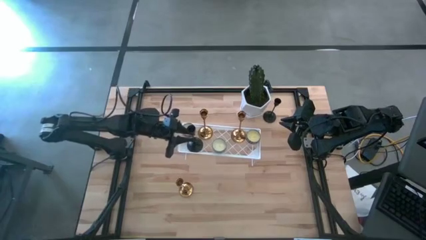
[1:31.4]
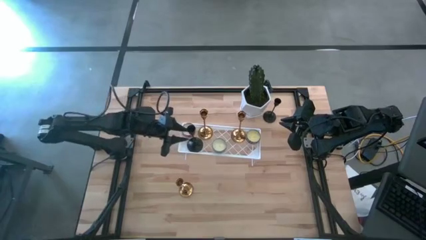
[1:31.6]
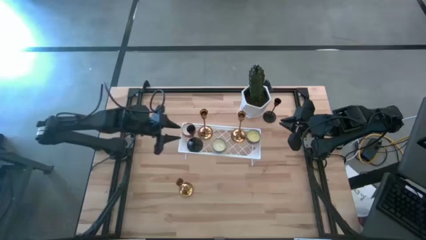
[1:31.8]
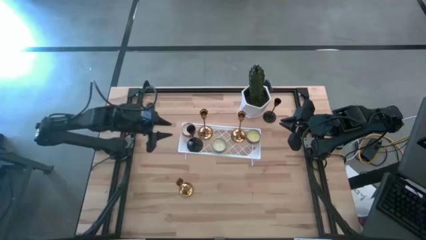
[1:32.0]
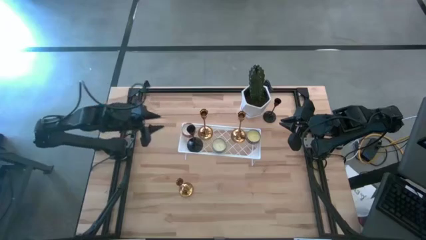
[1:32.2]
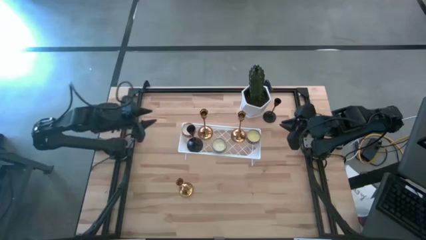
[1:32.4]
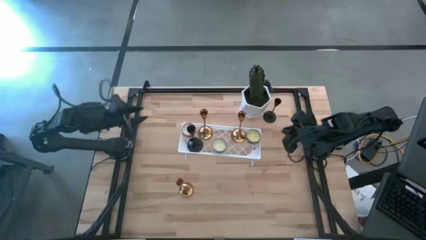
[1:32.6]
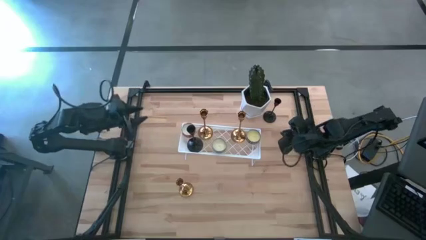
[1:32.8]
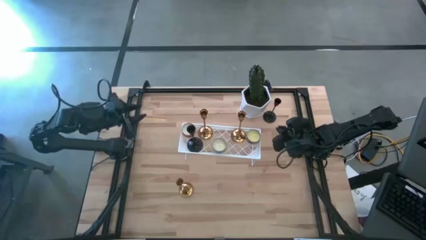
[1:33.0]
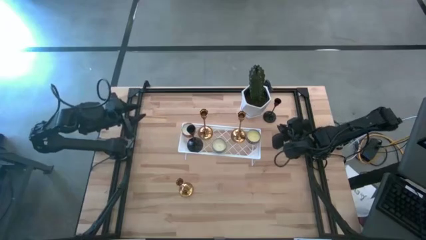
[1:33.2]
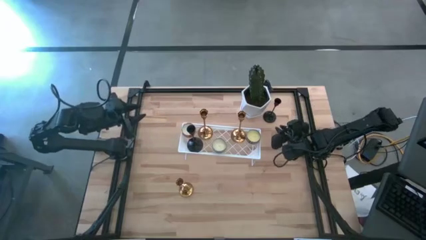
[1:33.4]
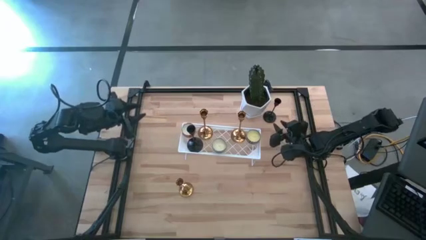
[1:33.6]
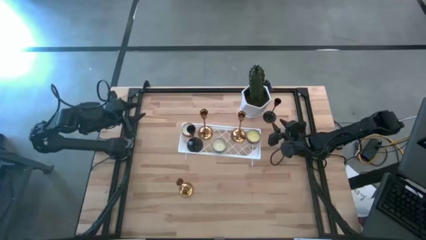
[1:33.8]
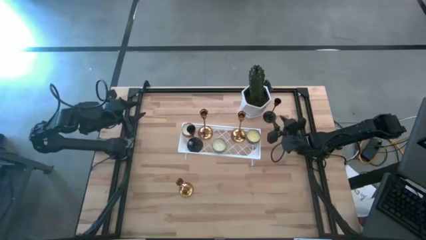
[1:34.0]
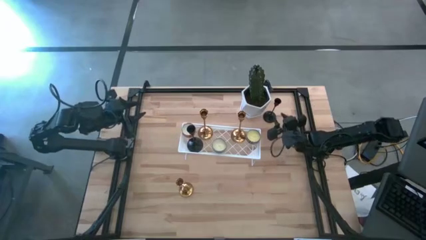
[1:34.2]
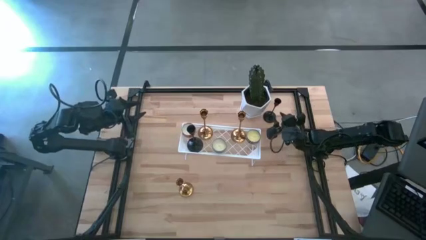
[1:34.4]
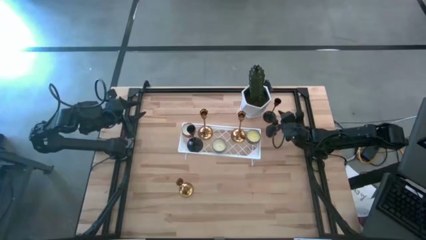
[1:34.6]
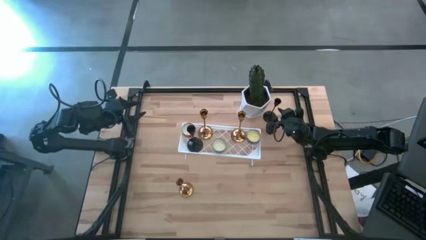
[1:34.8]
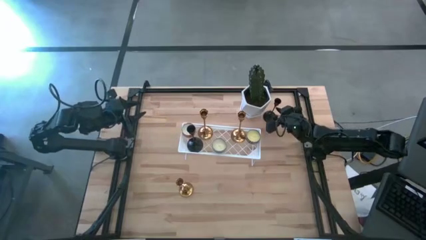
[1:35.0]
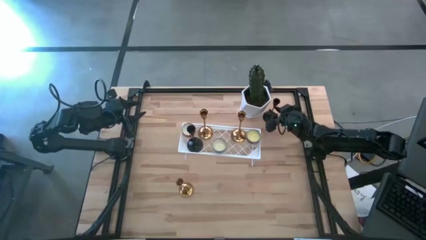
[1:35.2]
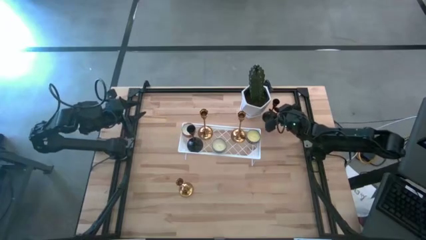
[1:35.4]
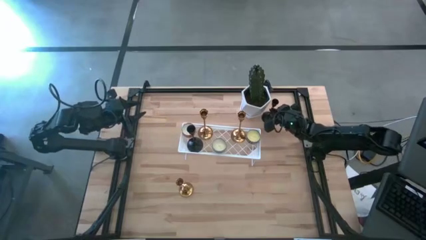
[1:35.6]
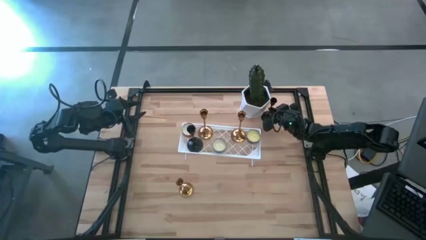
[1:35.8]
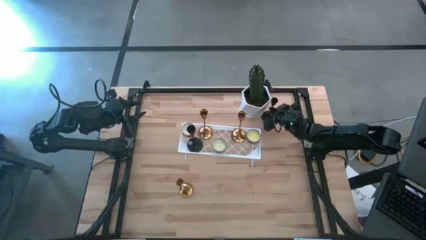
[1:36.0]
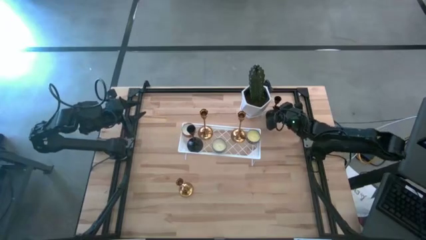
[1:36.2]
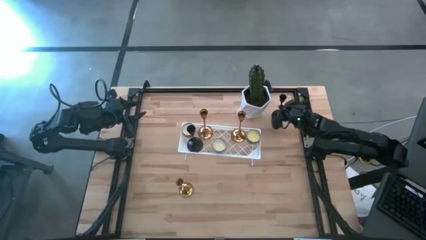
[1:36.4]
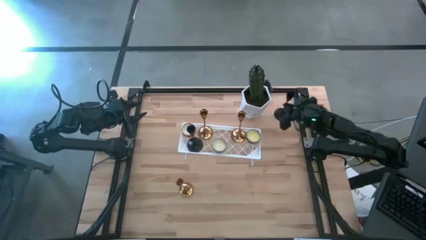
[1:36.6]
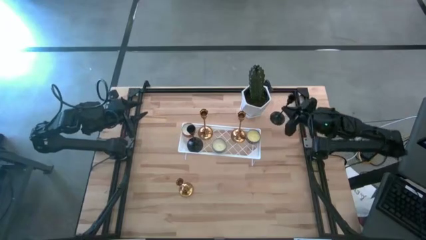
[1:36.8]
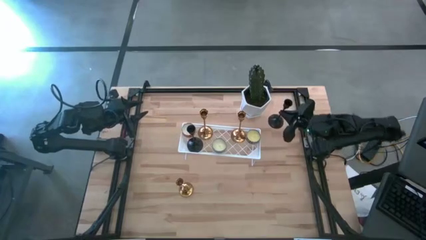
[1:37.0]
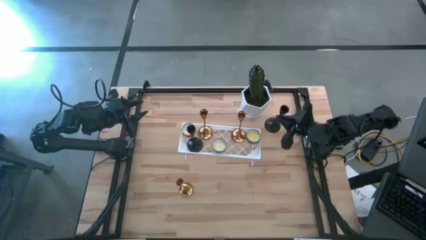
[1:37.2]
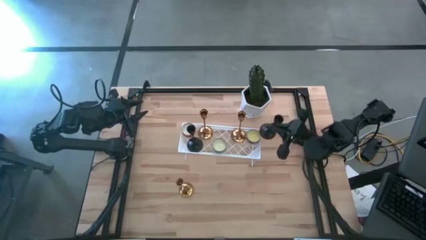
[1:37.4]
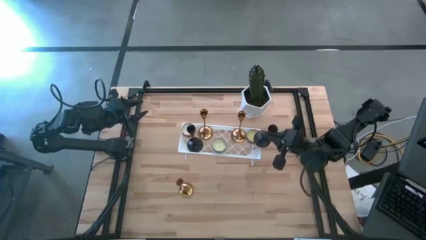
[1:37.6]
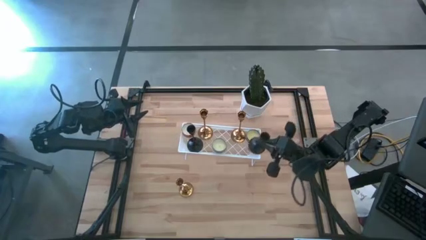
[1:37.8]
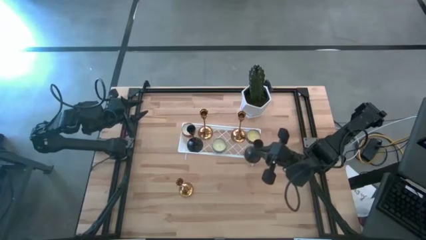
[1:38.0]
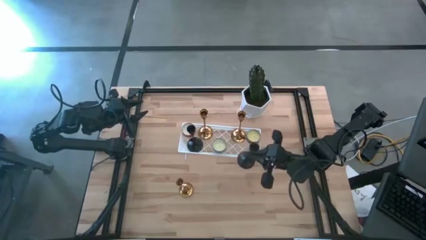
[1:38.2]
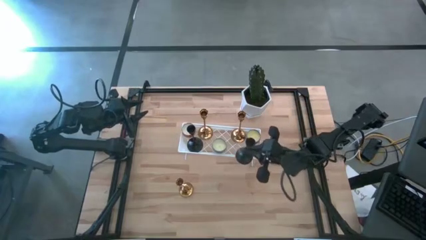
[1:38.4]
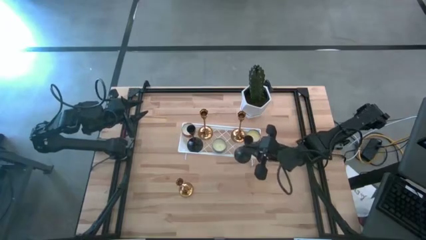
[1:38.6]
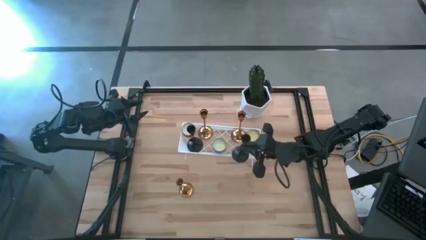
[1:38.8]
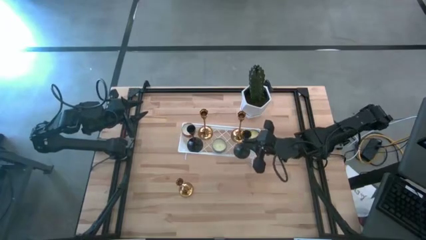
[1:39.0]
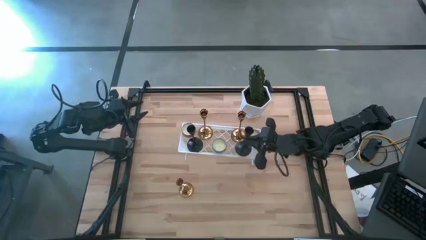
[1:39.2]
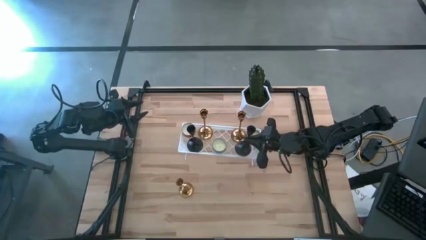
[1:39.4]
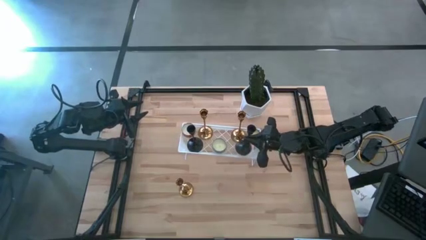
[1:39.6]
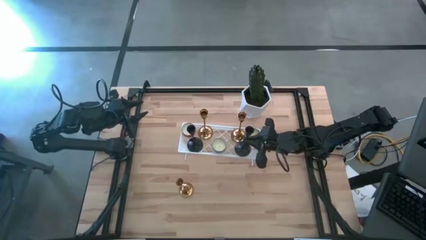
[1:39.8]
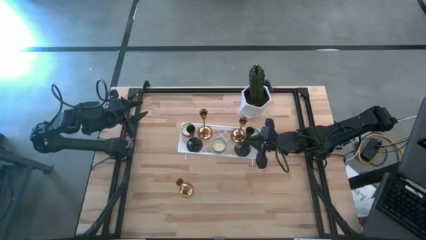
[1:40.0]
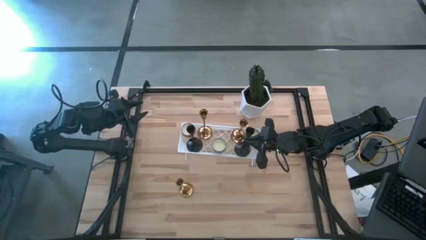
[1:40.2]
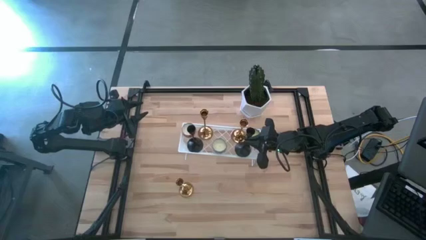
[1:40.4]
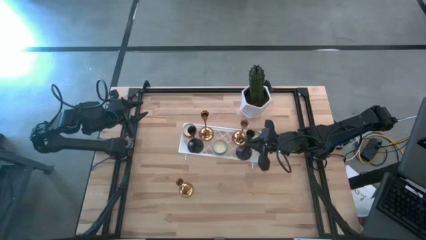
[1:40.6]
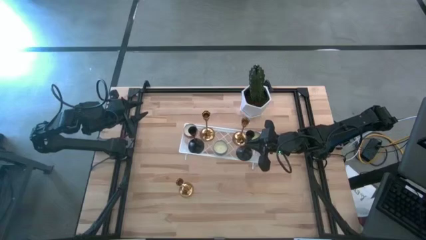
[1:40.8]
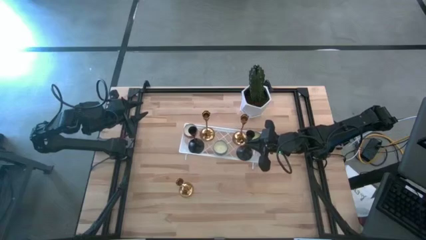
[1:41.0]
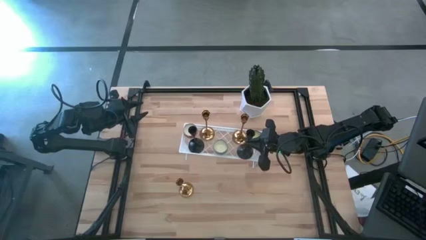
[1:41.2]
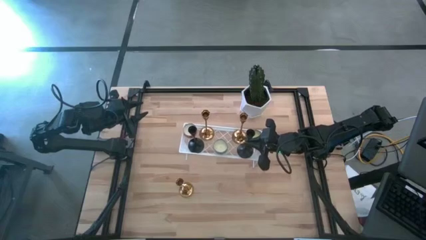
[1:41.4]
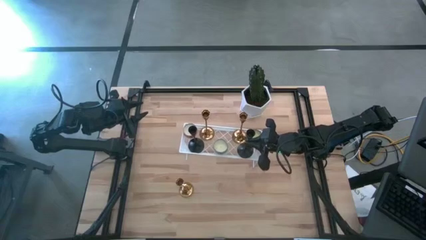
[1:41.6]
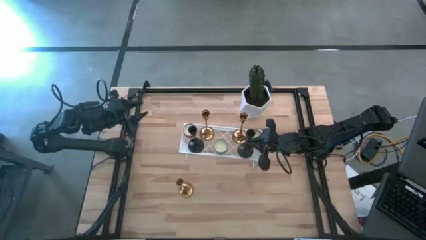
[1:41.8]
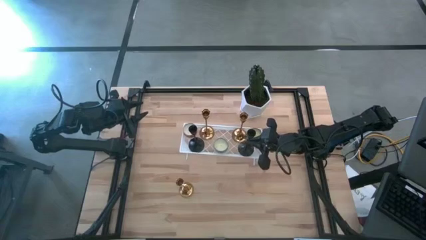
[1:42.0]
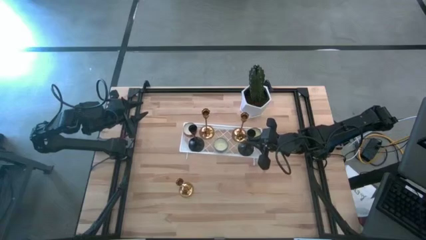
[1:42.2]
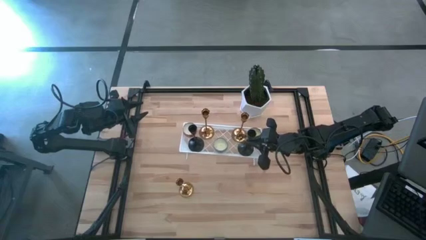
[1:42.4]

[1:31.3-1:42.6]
Task: Pick & Place candle stick holders
Put the black candle holder on the shelf
